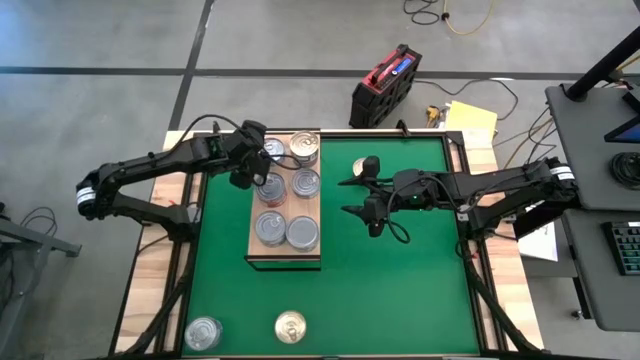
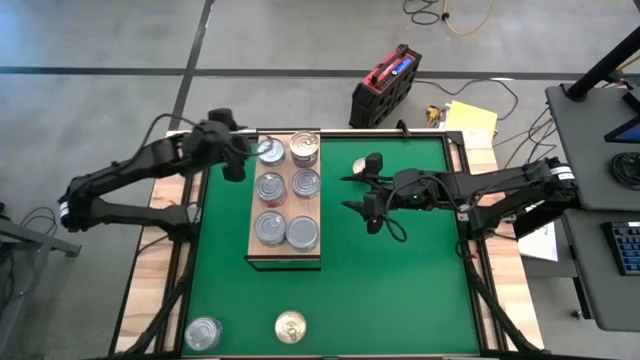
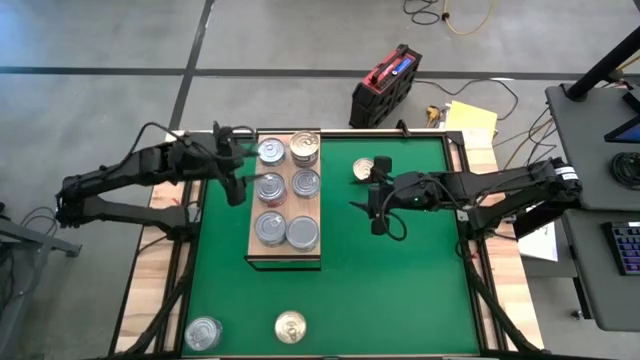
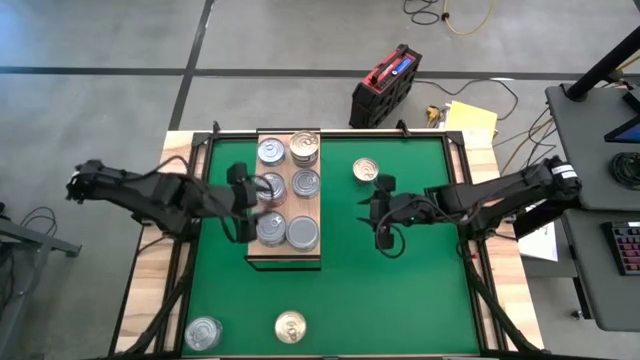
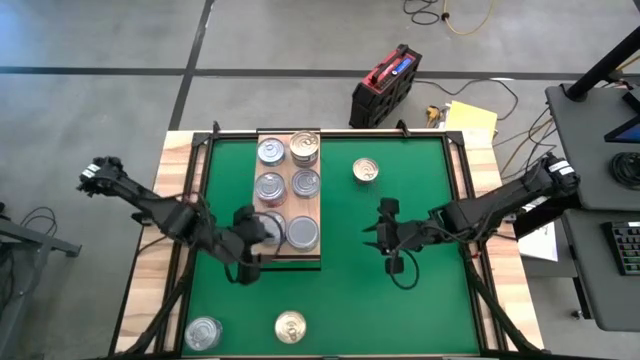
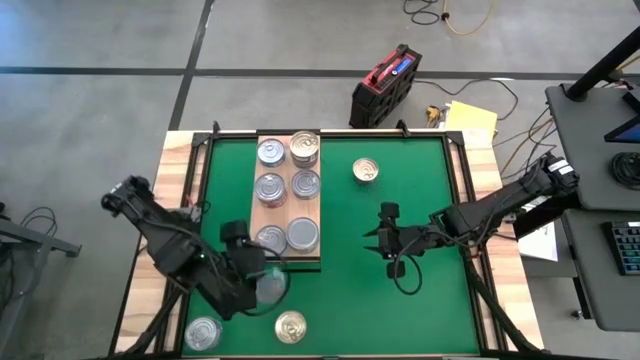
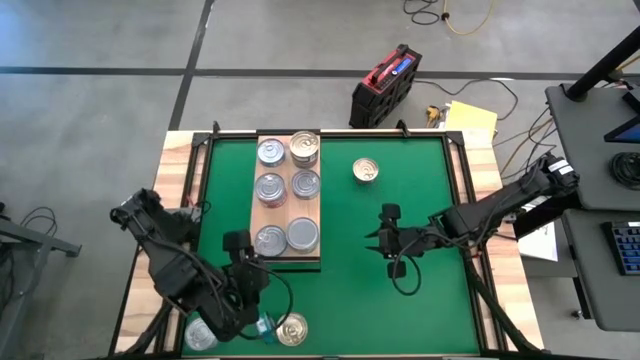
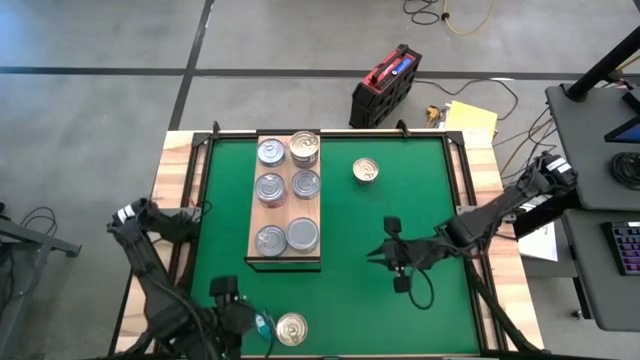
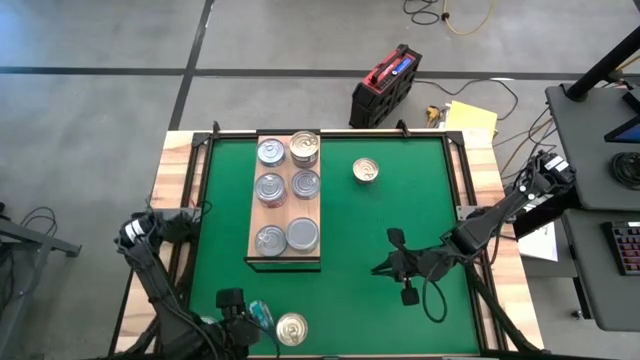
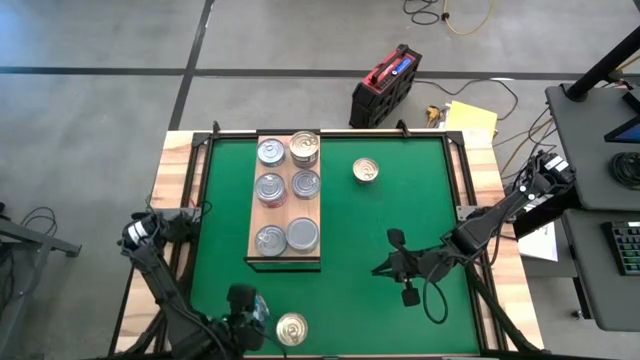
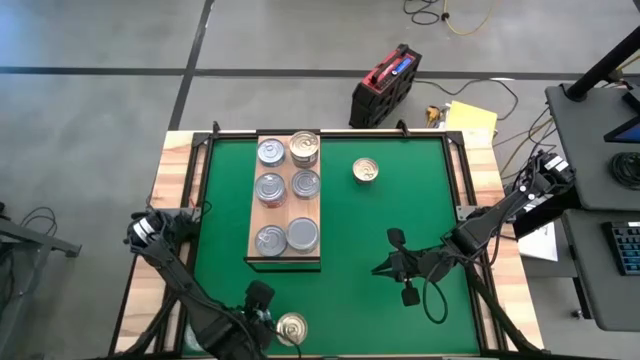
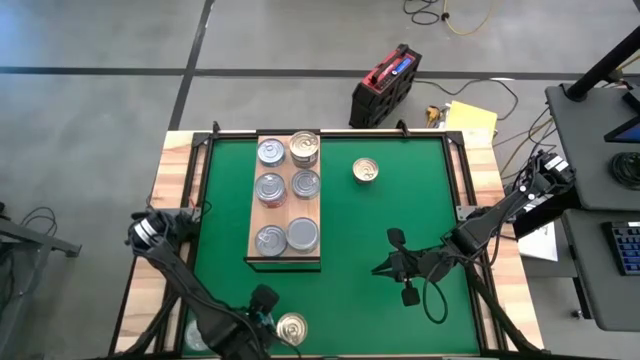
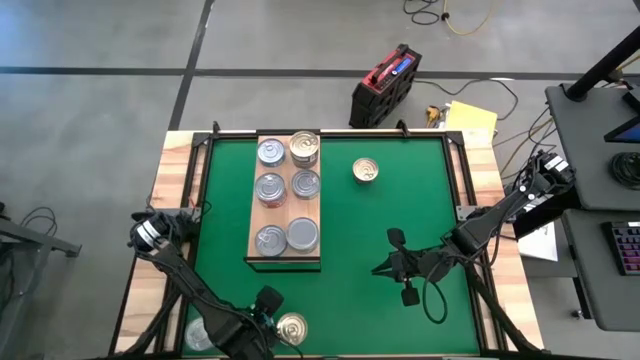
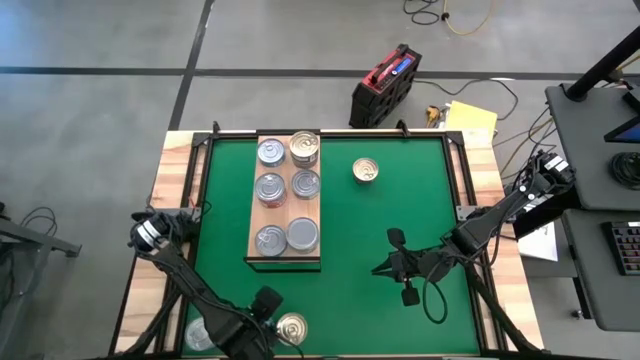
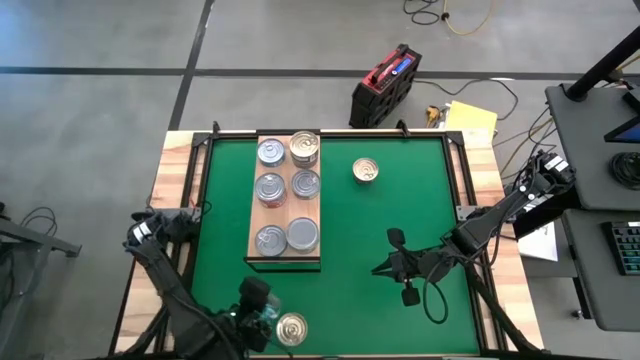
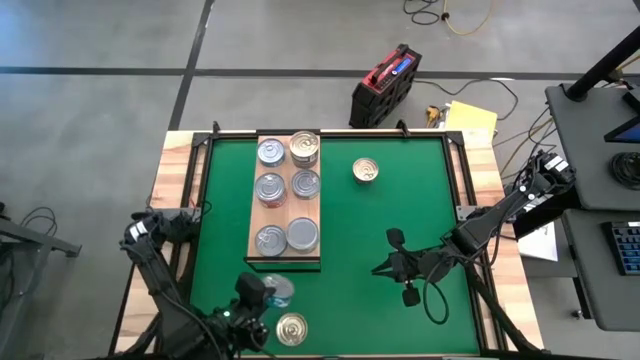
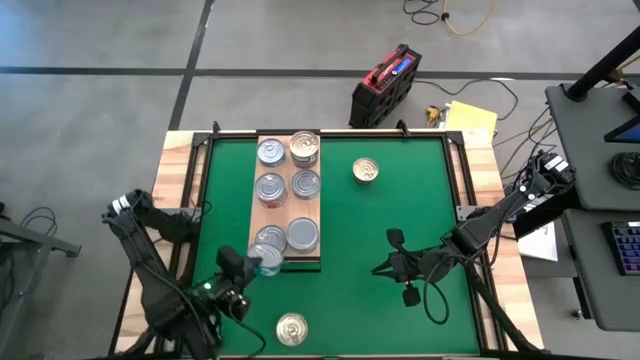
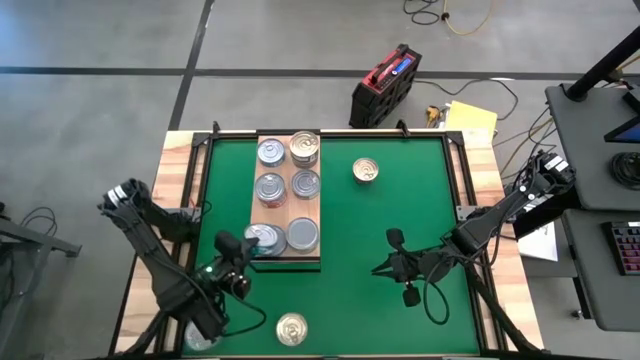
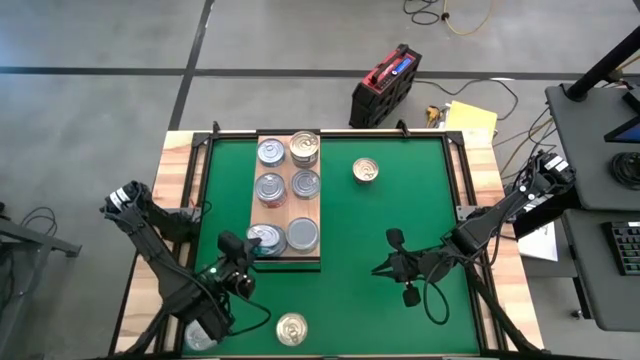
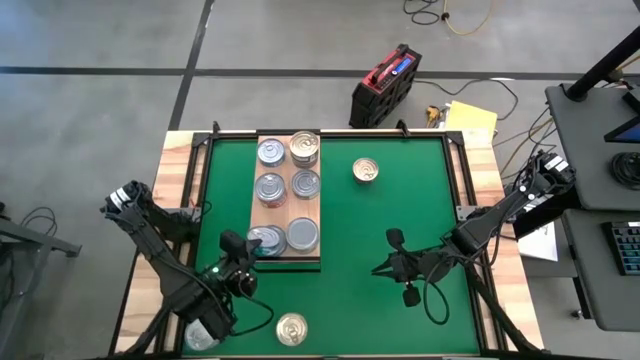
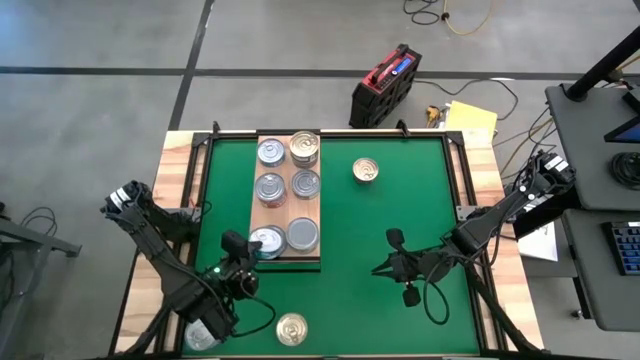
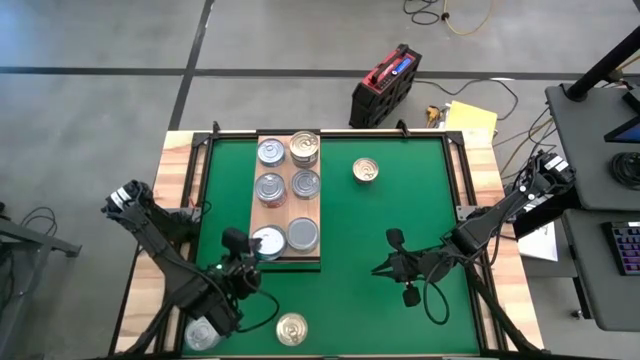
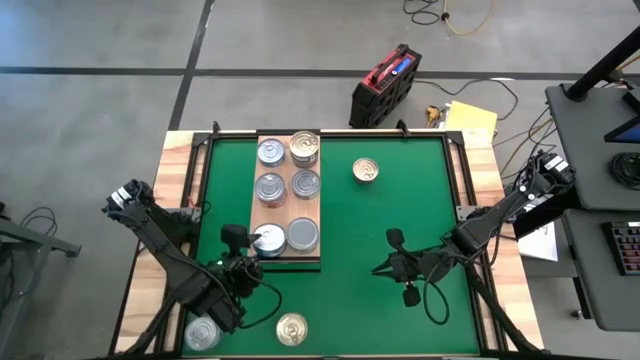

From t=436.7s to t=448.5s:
Task: Stack canned seafood by type on shelf
Put the green and blue tuna can on top of the green and blue tuna can on the shelf

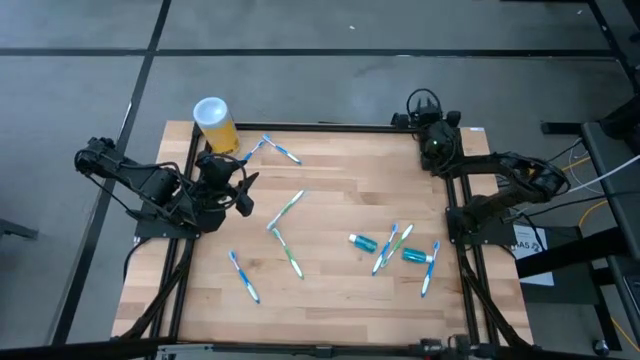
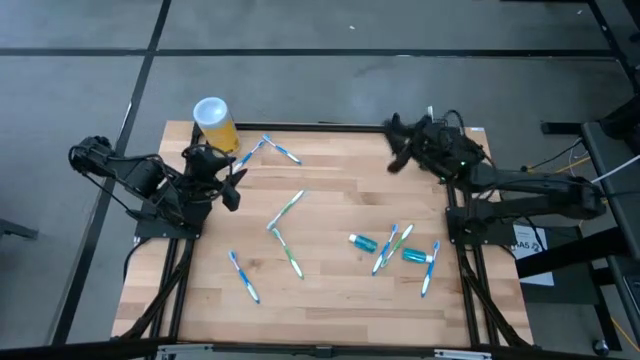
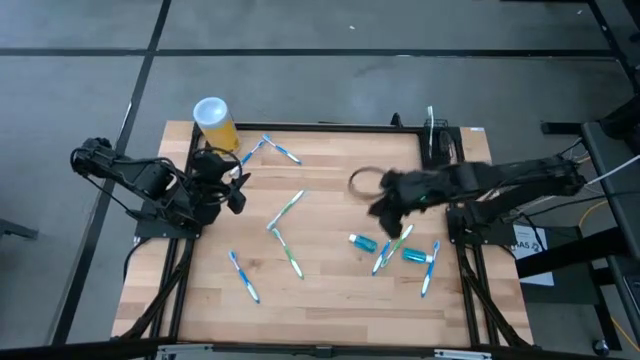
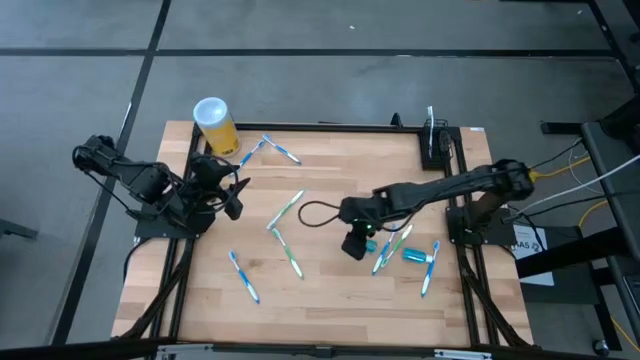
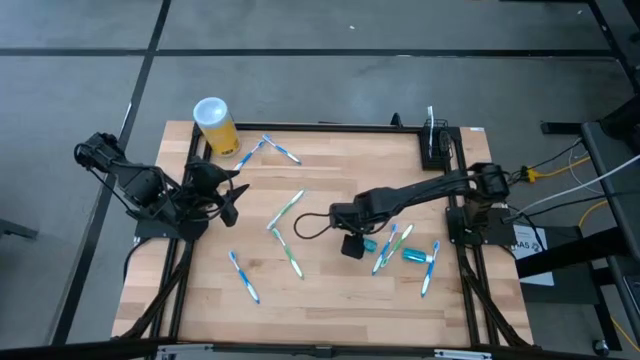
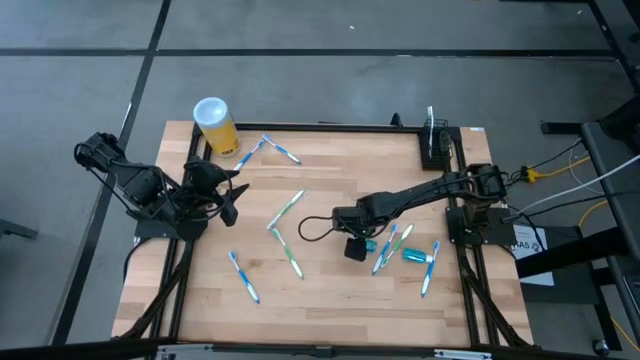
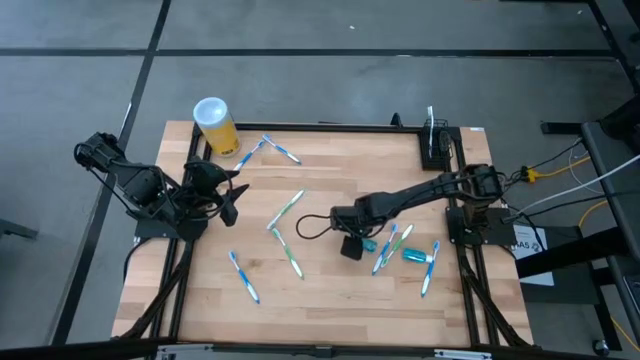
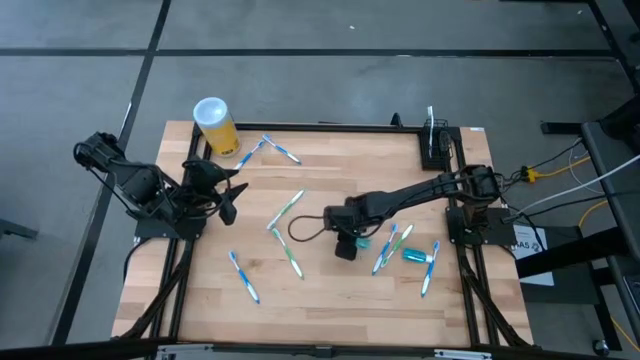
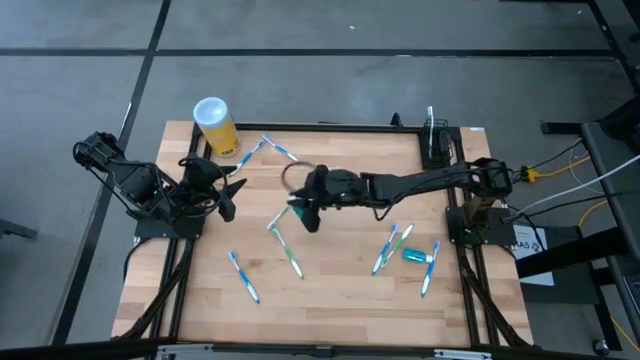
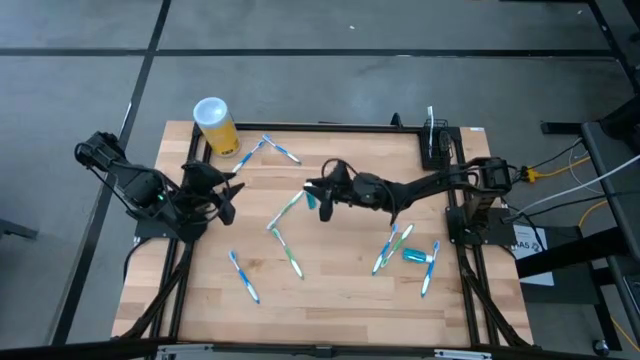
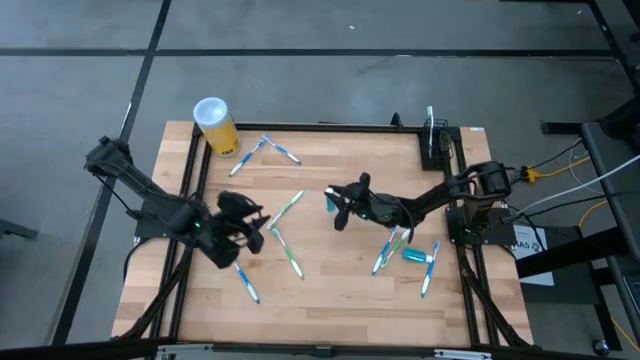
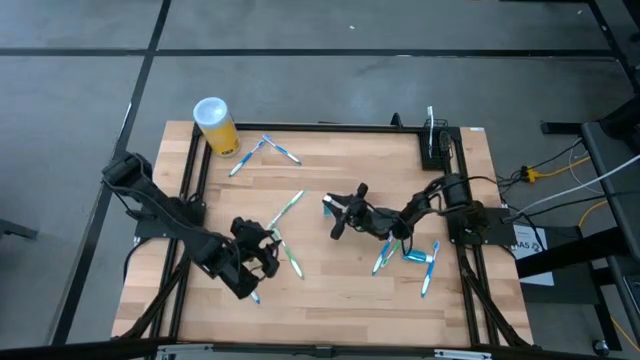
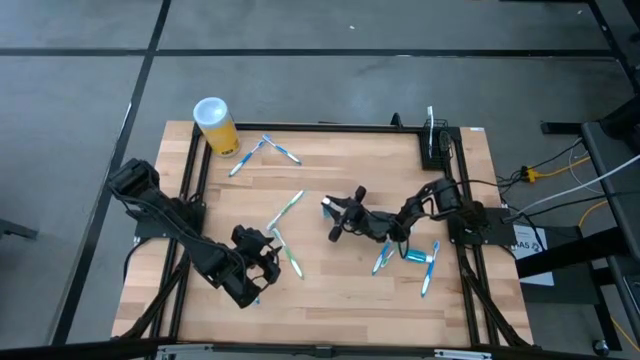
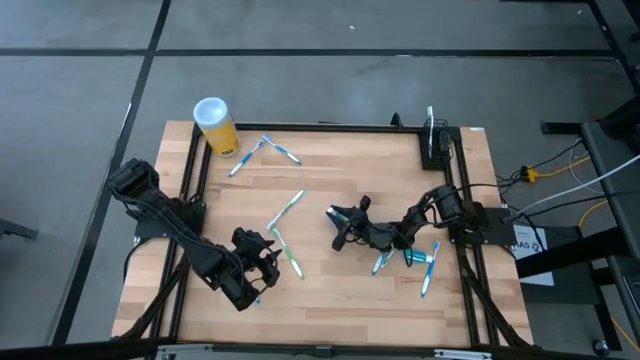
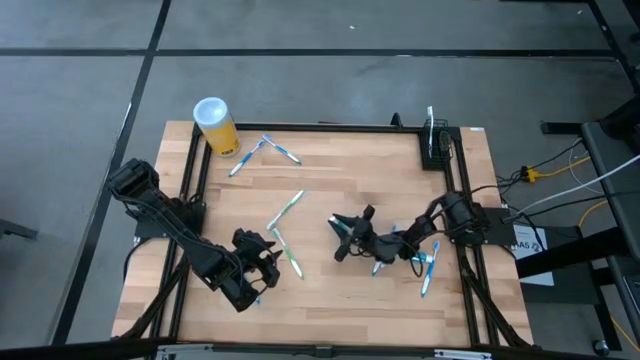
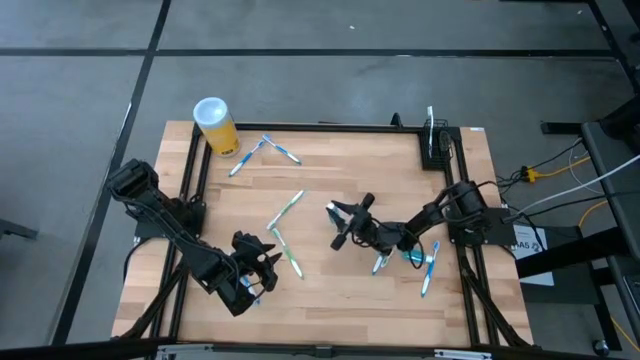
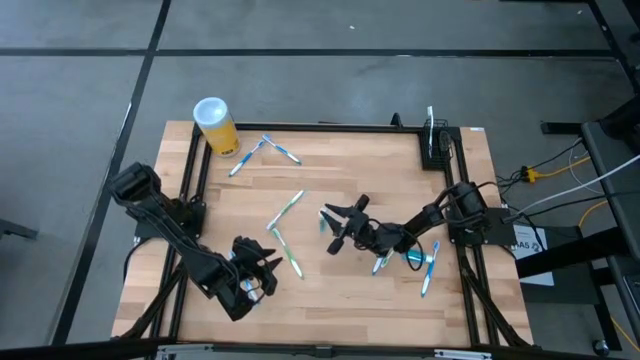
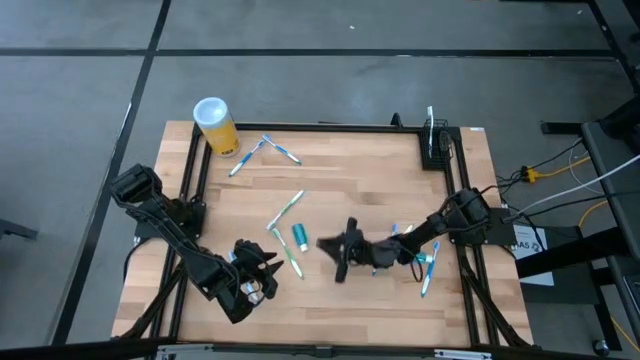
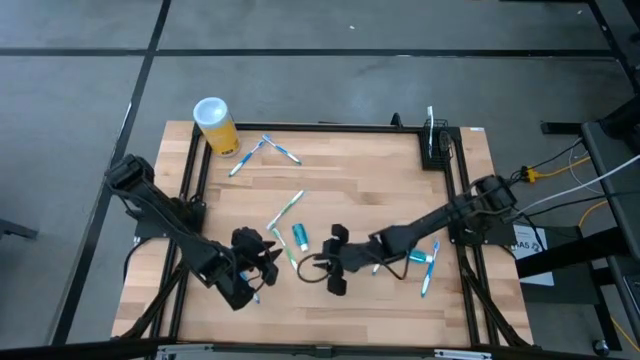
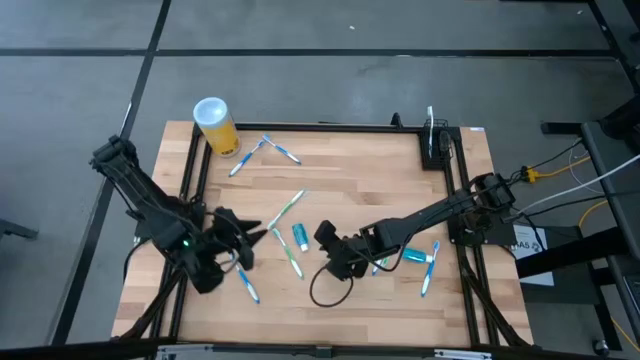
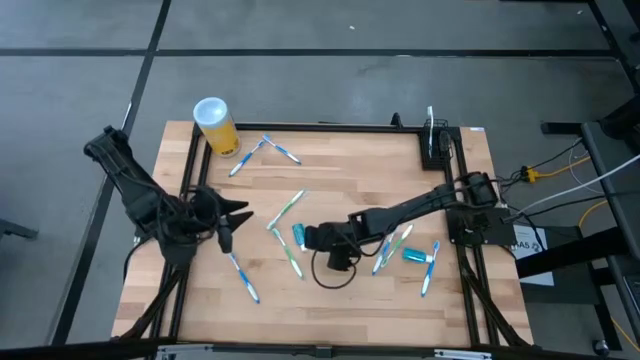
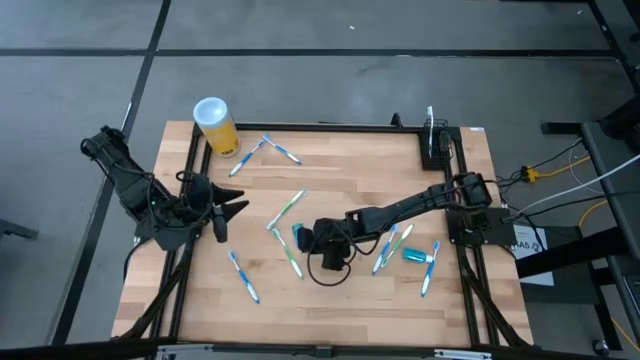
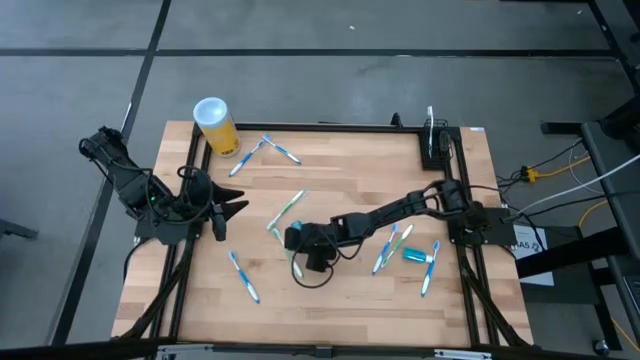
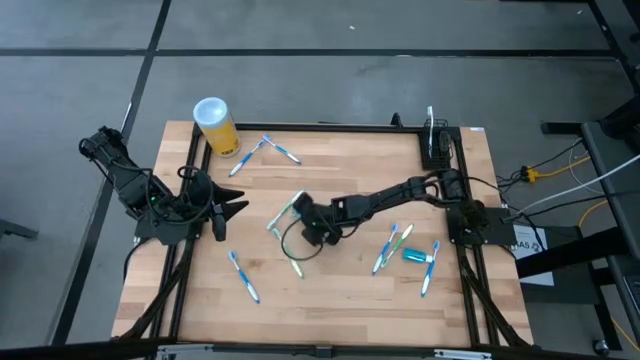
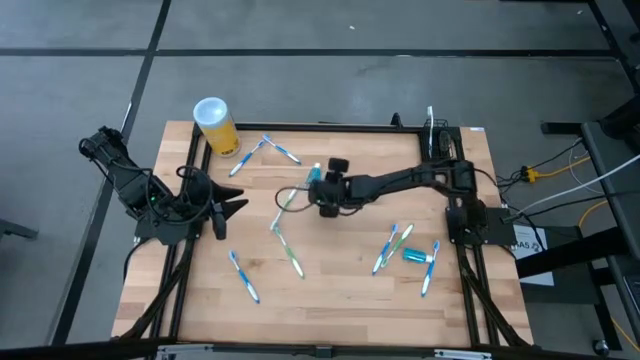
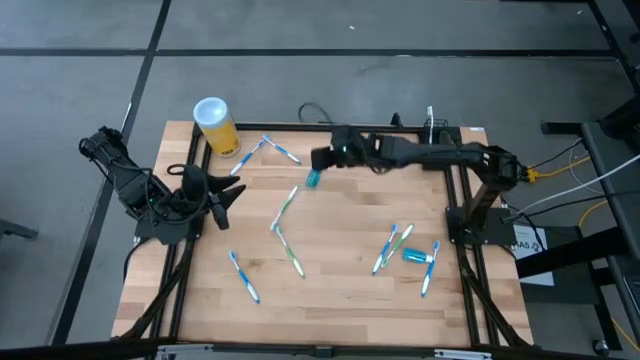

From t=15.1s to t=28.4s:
Task: Pick & Place toothbrushing station
Put the blue mouthwash into the mesh organizer
